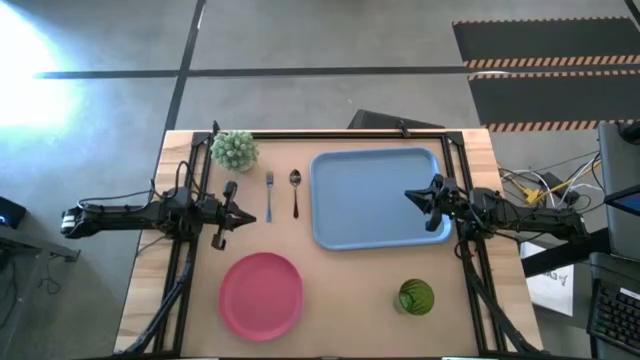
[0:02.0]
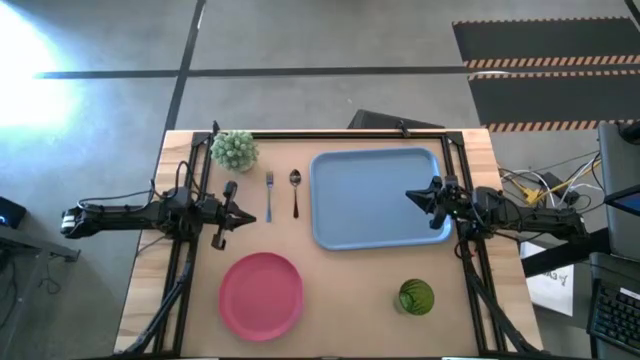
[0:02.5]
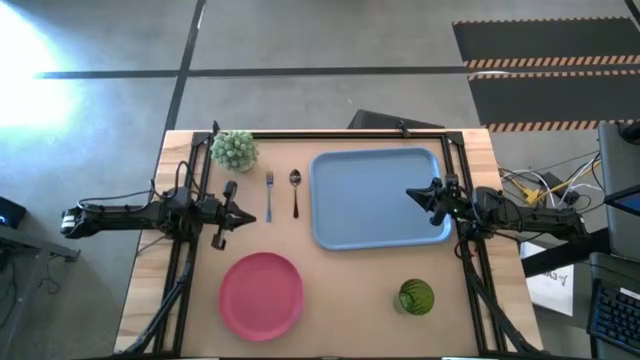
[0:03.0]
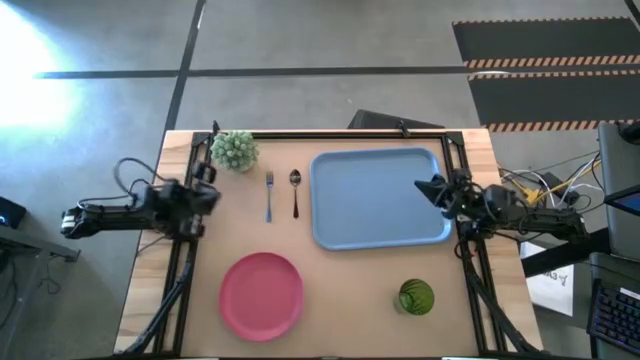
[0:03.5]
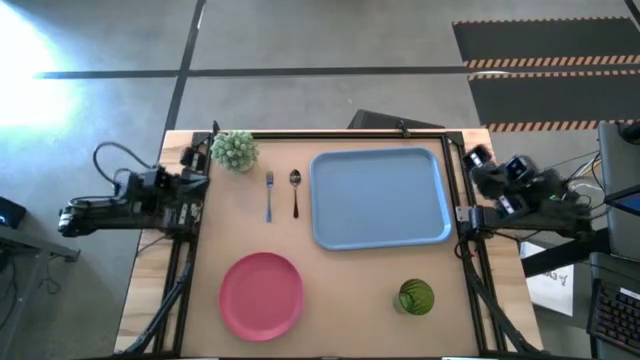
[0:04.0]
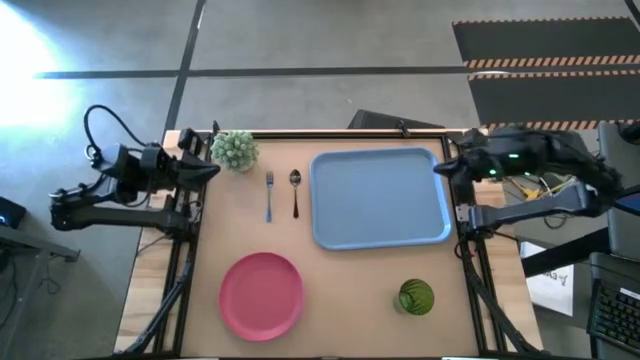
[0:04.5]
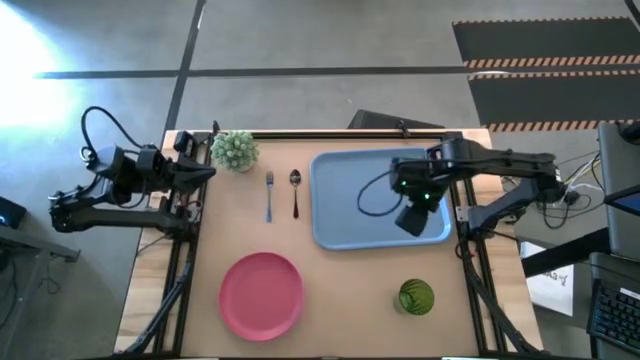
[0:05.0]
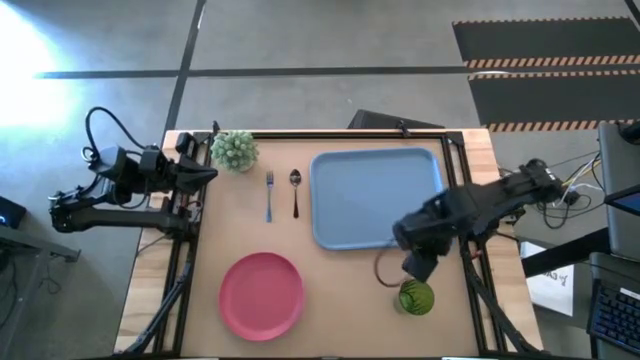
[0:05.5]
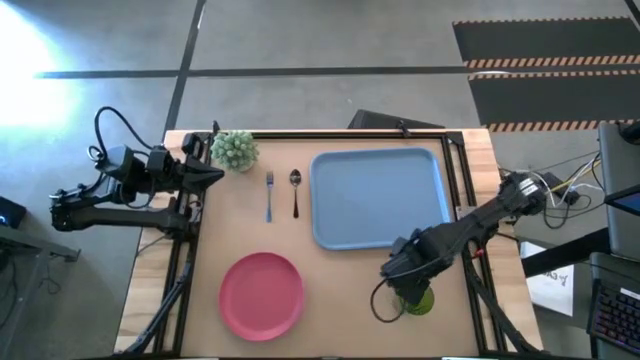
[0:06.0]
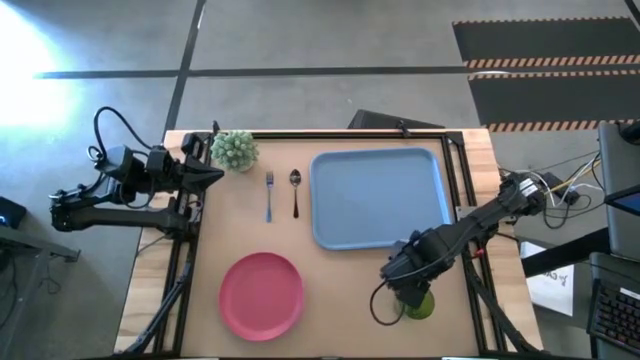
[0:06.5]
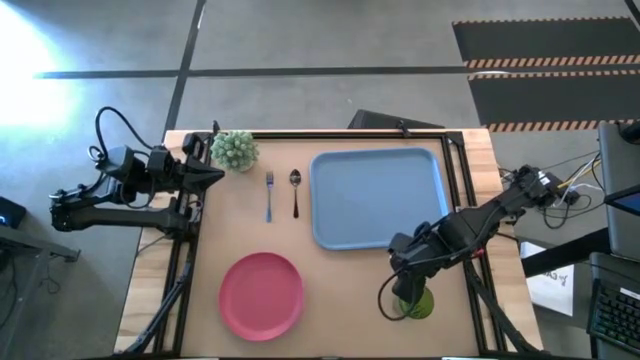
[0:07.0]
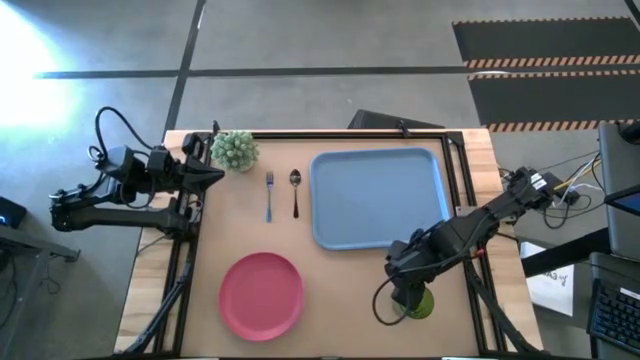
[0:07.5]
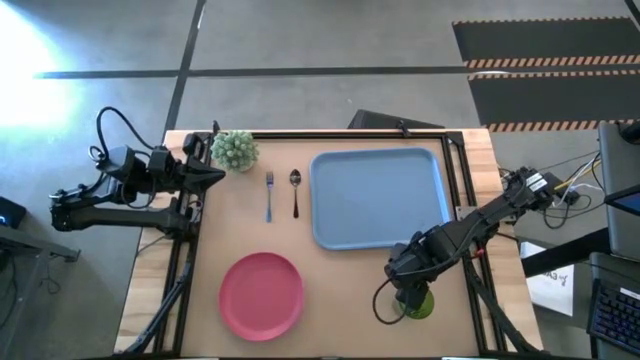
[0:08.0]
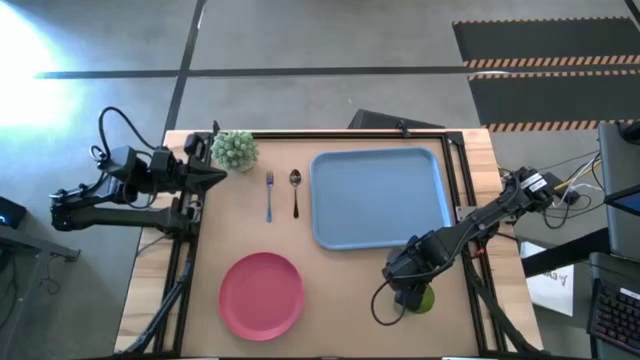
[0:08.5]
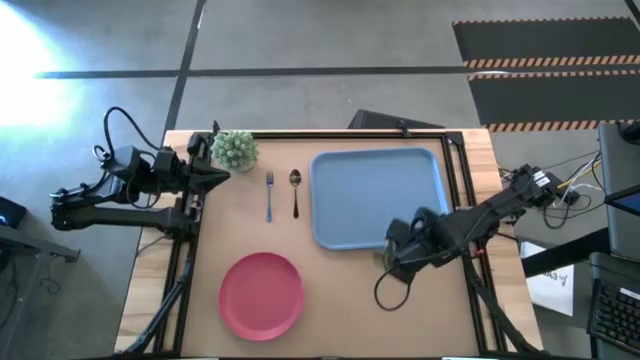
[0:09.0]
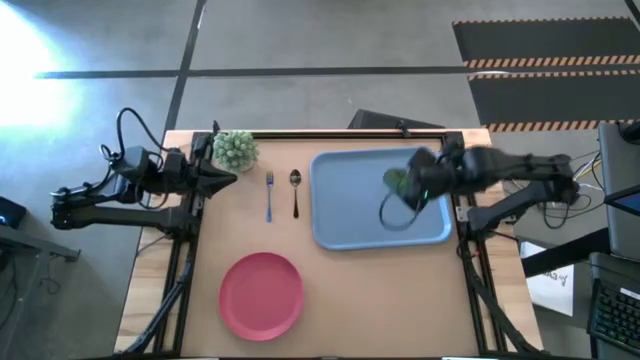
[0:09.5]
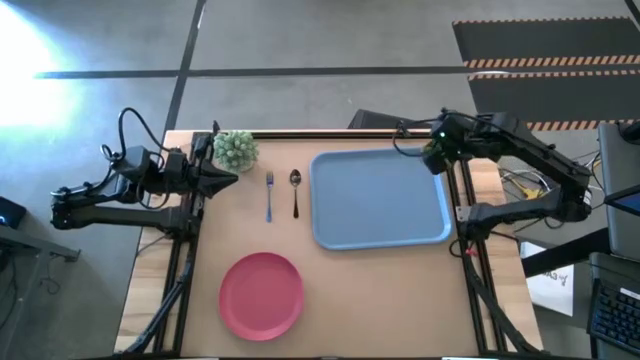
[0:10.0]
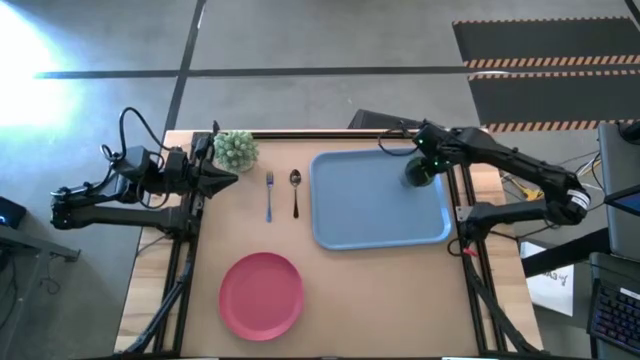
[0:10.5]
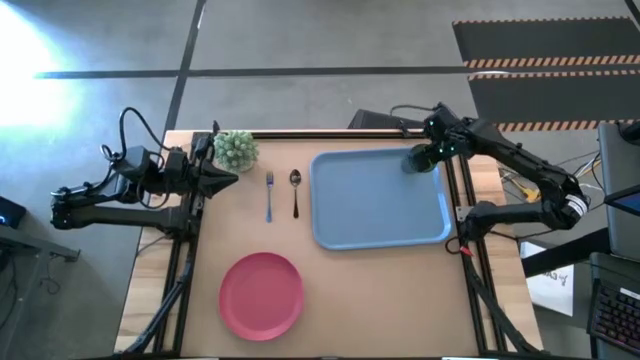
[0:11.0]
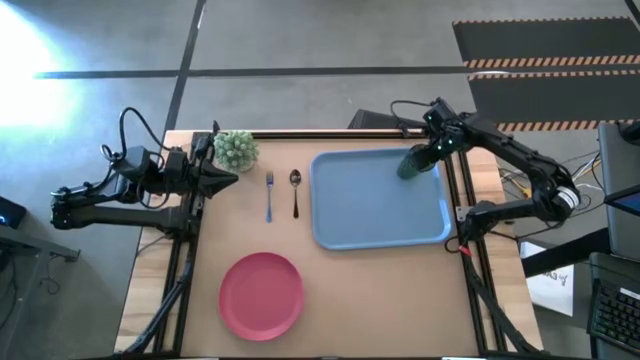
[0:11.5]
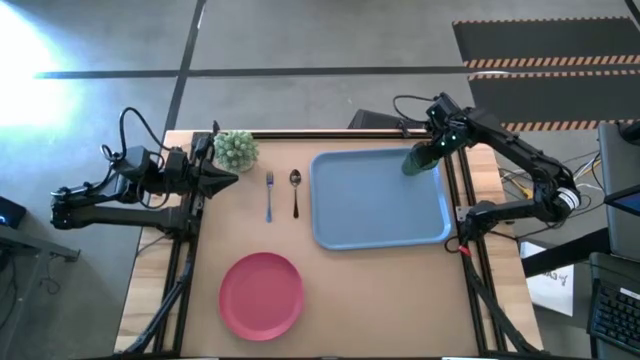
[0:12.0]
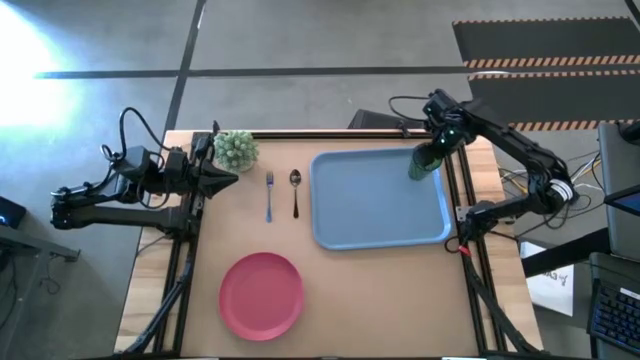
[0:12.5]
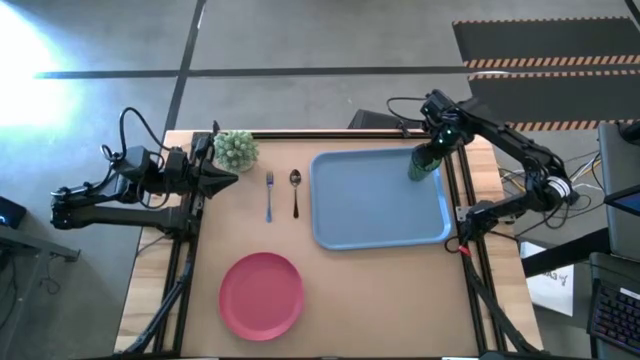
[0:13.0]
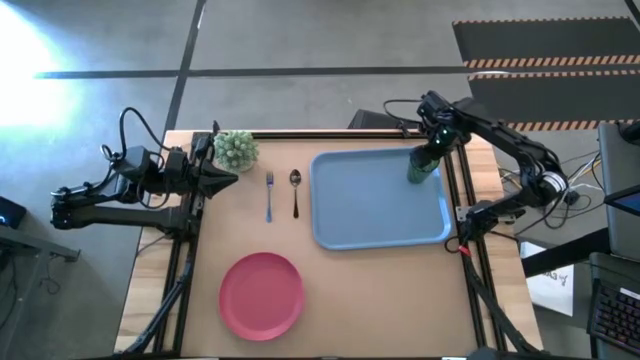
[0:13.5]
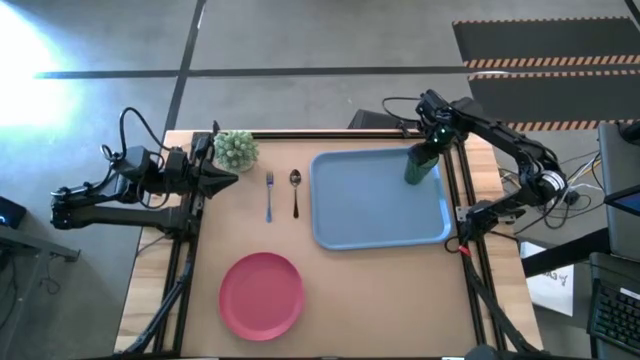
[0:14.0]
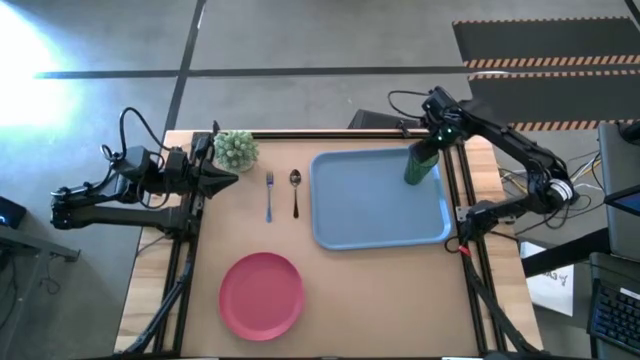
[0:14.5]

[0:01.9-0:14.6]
Task: Pick and place plate/cup/fork/spoon on tray
Put the green cup on the blue tray

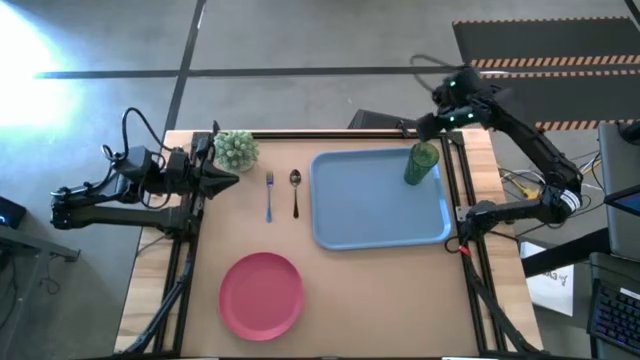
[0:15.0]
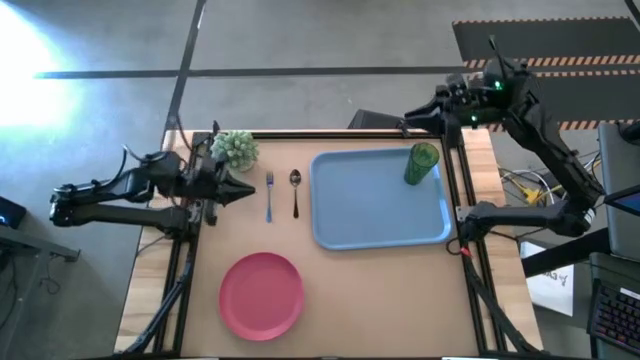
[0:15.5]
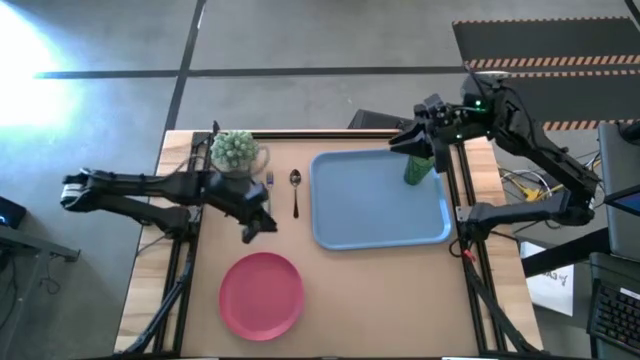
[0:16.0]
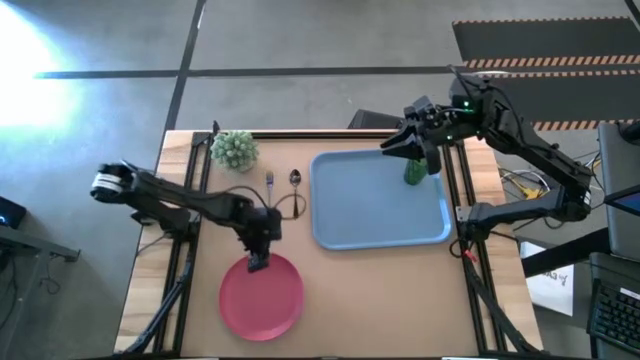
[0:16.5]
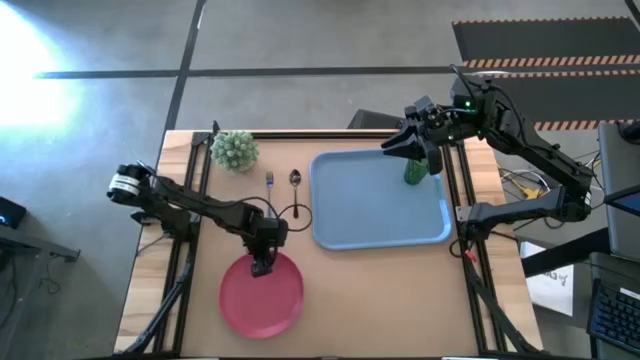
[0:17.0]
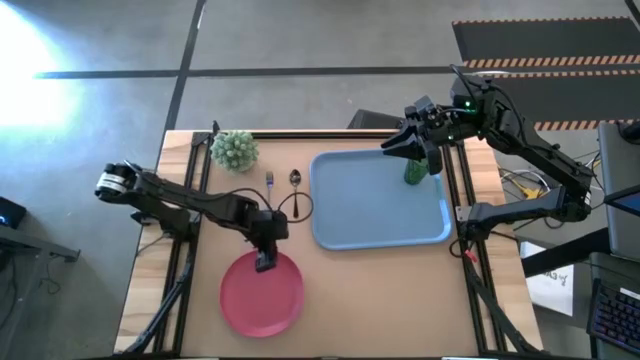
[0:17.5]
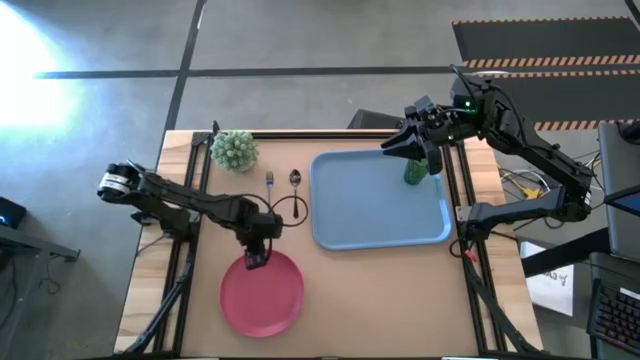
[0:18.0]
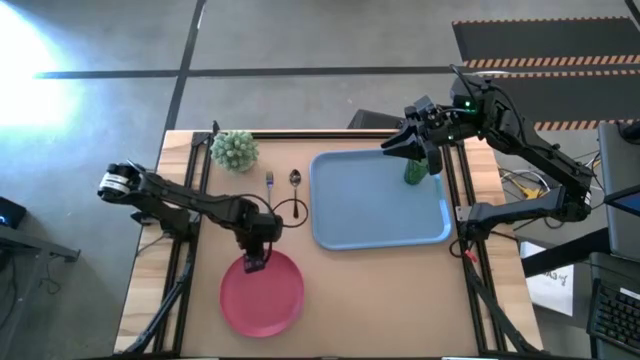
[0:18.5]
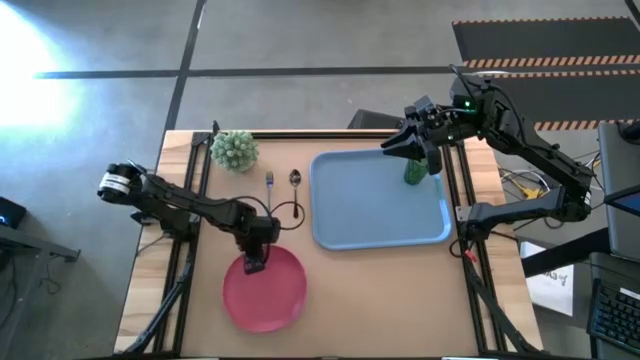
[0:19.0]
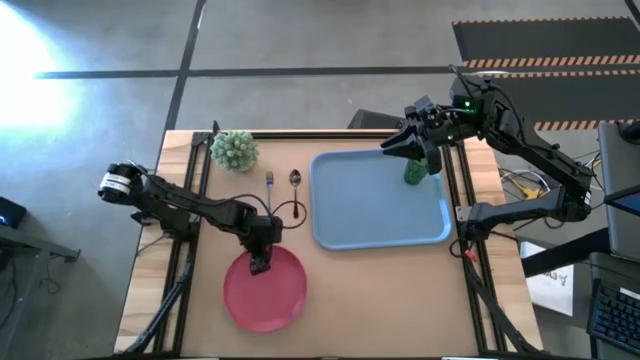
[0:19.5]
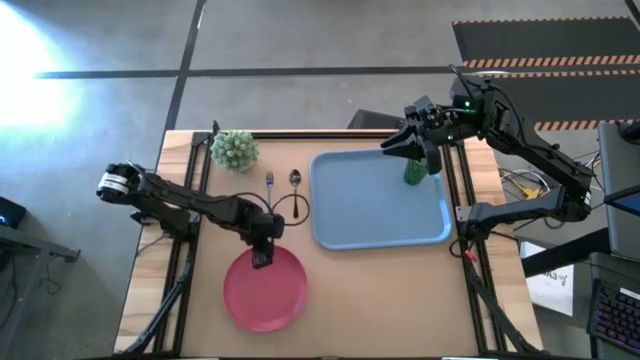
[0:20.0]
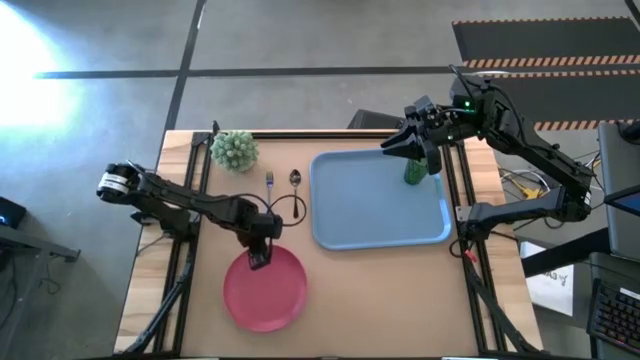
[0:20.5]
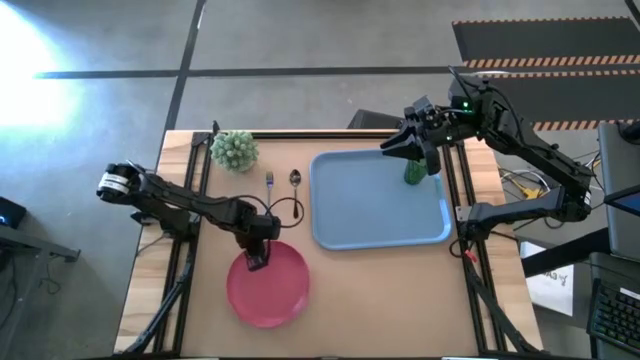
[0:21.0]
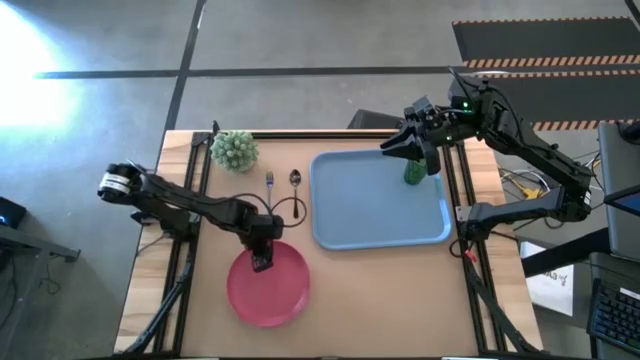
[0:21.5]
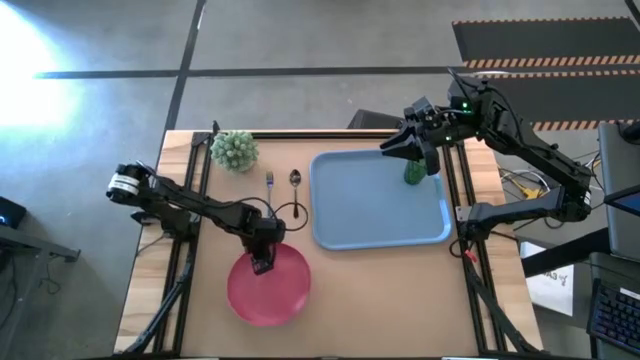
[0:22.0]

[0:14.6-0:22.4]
Put the pink plate on the blue tray
